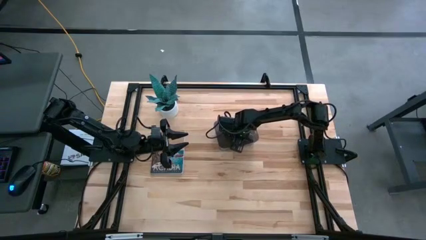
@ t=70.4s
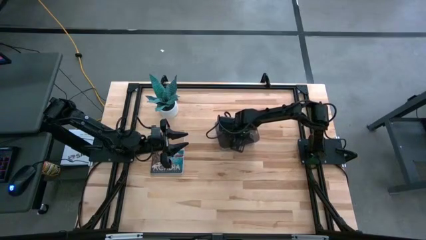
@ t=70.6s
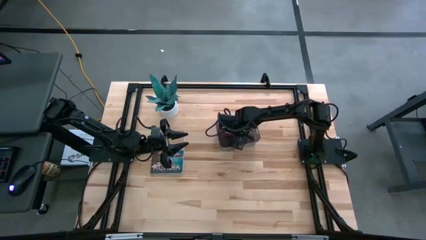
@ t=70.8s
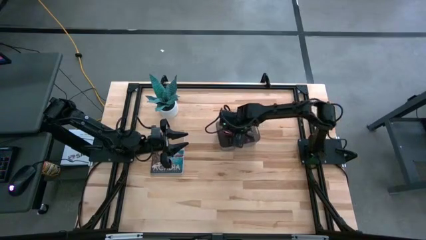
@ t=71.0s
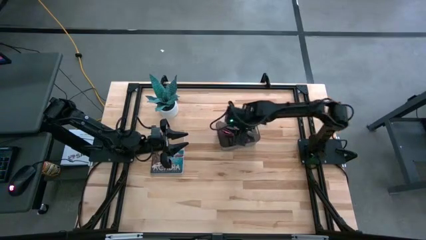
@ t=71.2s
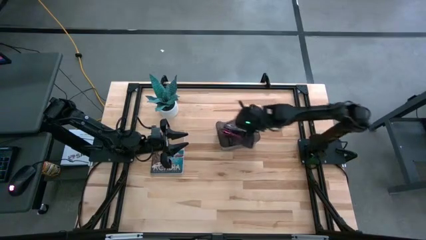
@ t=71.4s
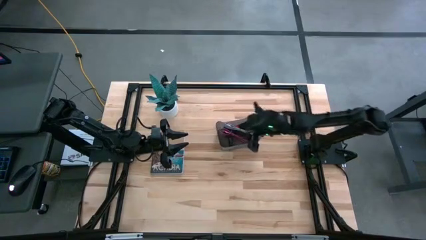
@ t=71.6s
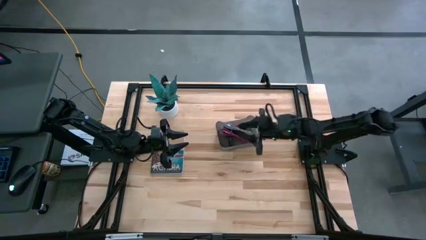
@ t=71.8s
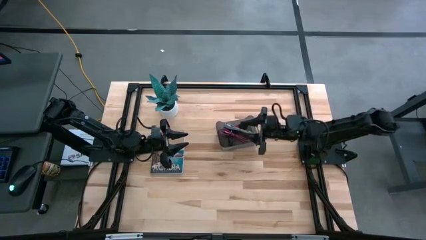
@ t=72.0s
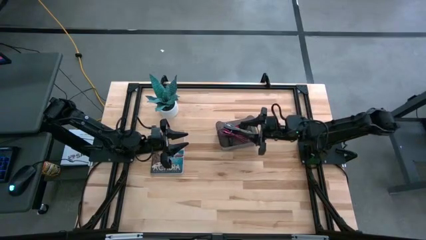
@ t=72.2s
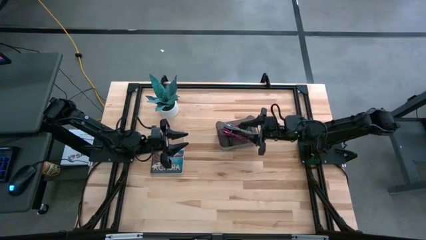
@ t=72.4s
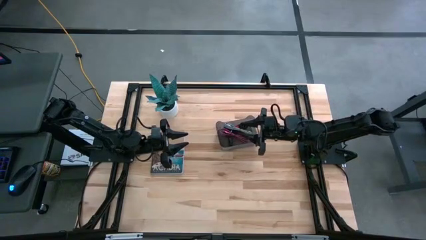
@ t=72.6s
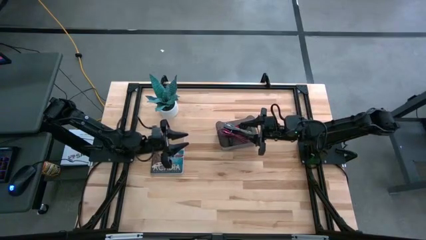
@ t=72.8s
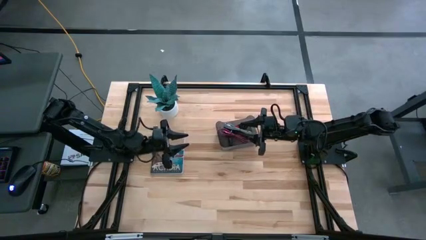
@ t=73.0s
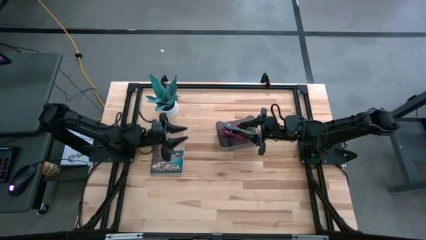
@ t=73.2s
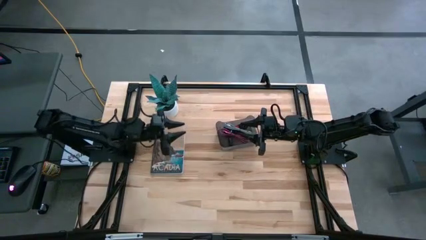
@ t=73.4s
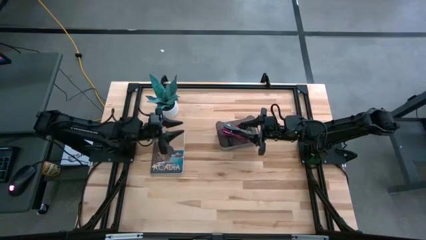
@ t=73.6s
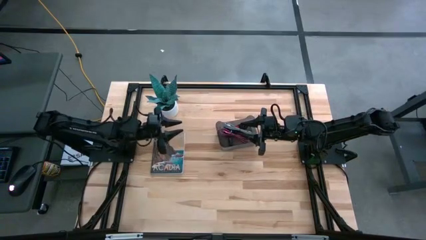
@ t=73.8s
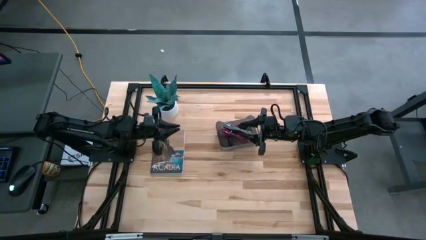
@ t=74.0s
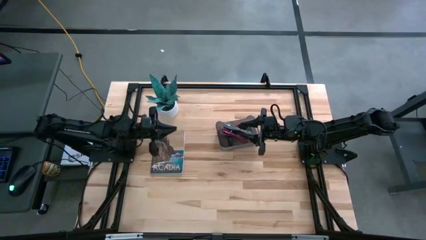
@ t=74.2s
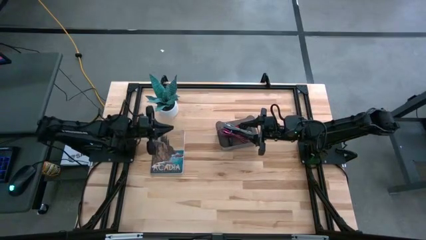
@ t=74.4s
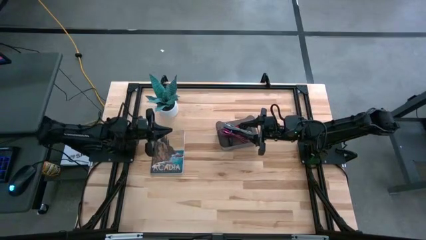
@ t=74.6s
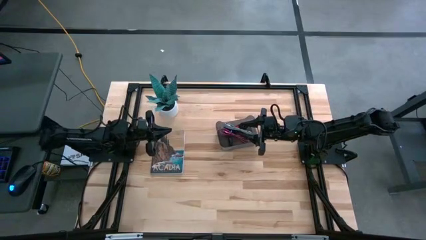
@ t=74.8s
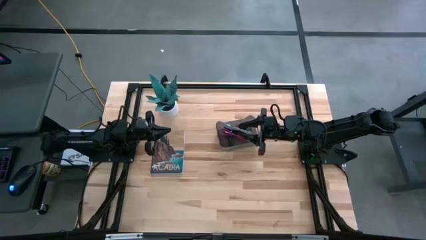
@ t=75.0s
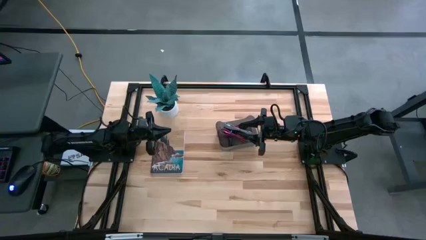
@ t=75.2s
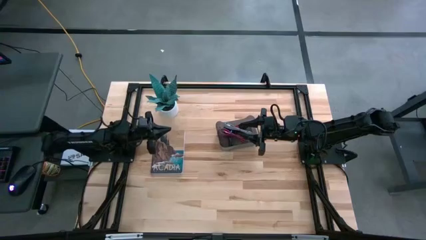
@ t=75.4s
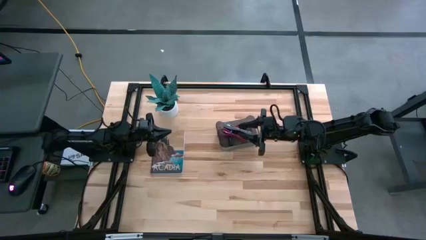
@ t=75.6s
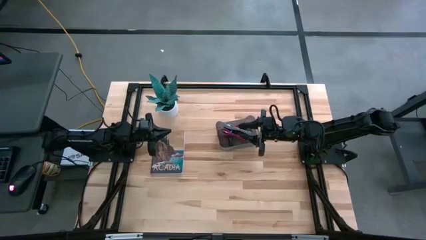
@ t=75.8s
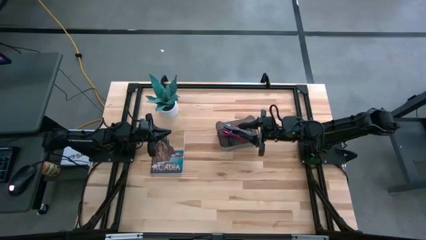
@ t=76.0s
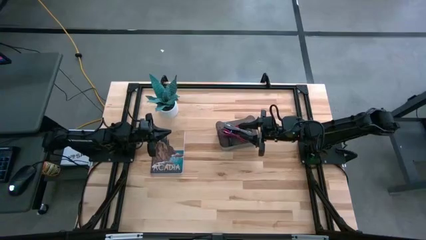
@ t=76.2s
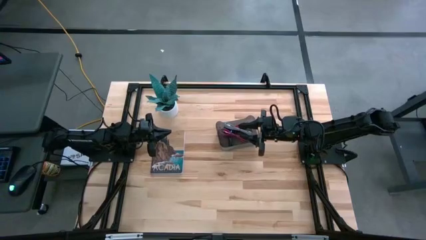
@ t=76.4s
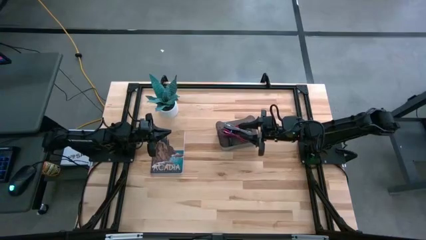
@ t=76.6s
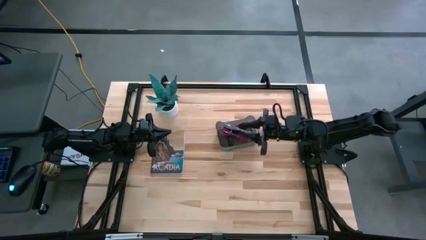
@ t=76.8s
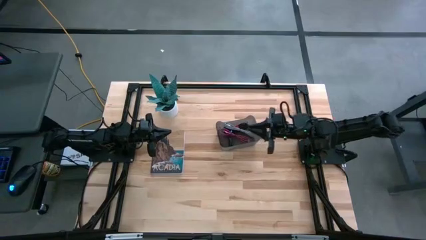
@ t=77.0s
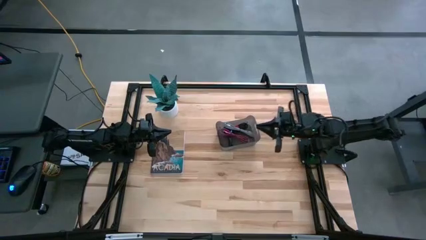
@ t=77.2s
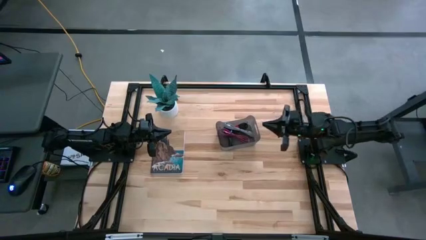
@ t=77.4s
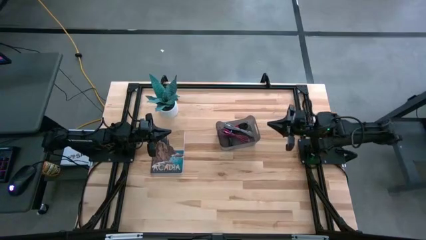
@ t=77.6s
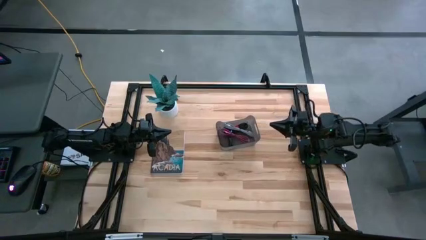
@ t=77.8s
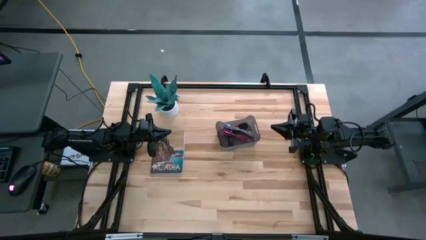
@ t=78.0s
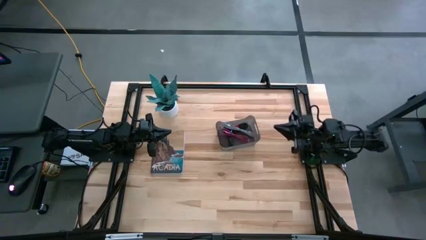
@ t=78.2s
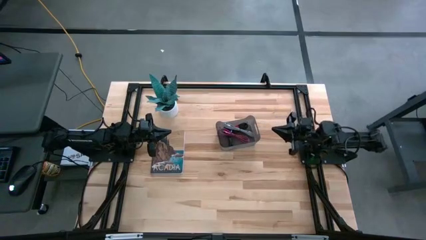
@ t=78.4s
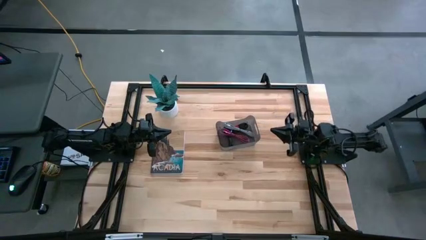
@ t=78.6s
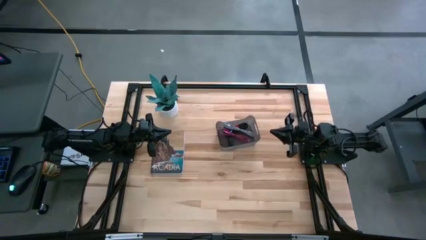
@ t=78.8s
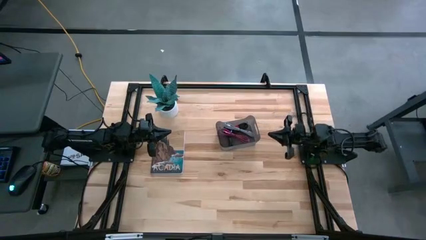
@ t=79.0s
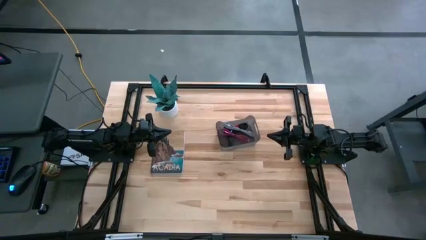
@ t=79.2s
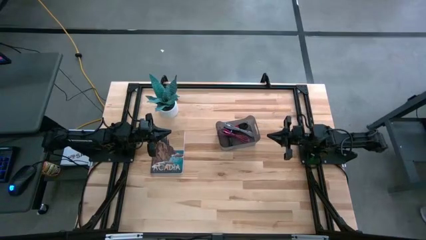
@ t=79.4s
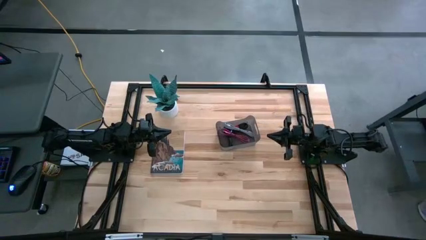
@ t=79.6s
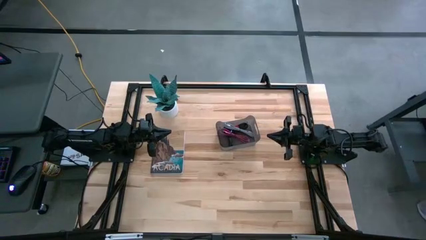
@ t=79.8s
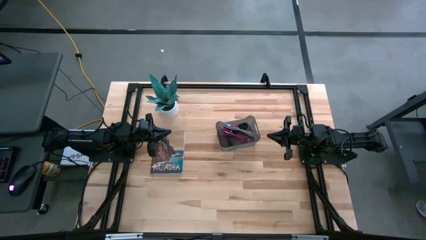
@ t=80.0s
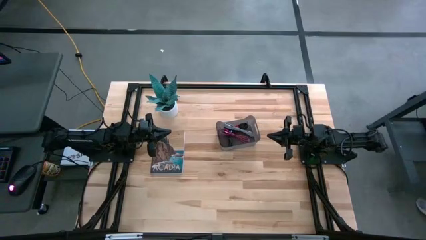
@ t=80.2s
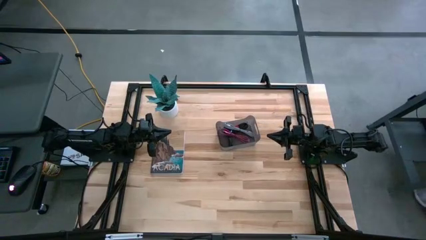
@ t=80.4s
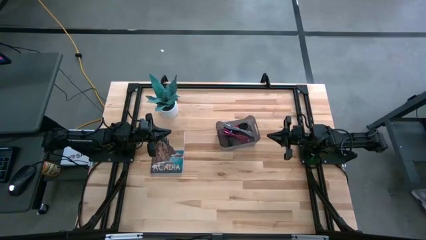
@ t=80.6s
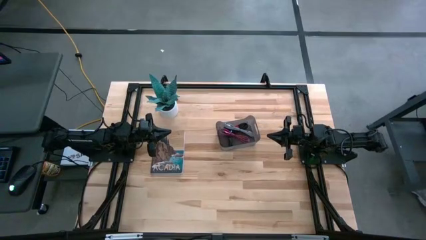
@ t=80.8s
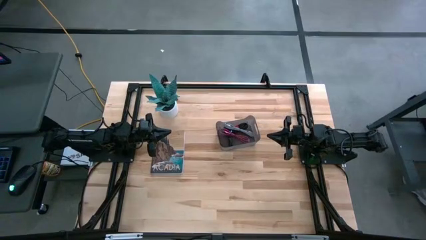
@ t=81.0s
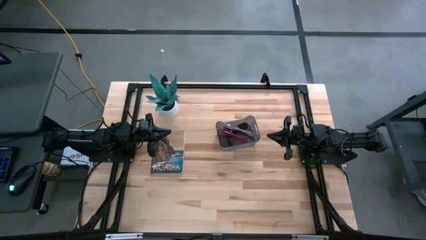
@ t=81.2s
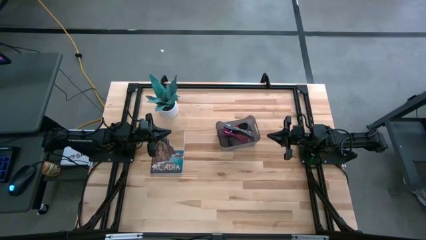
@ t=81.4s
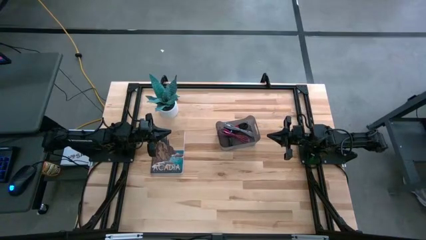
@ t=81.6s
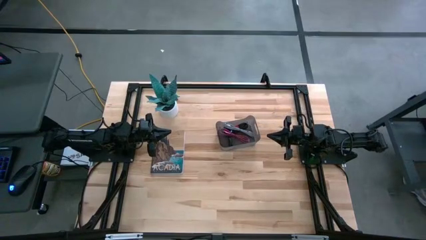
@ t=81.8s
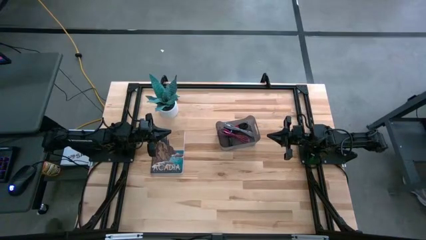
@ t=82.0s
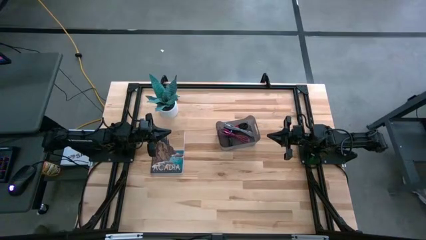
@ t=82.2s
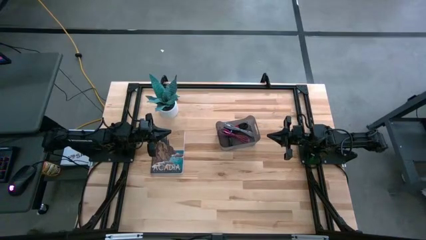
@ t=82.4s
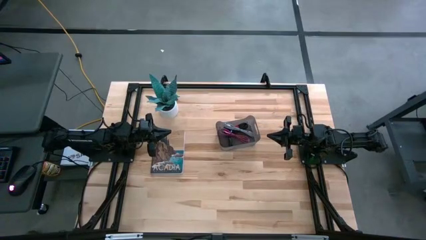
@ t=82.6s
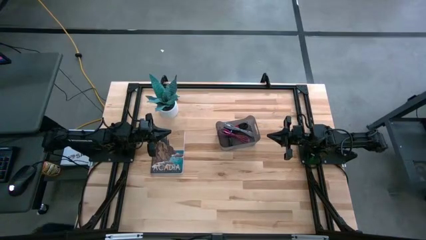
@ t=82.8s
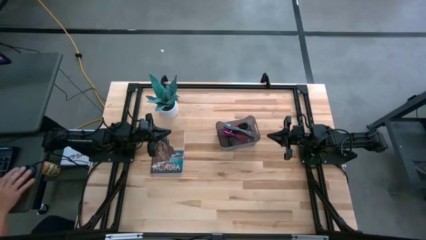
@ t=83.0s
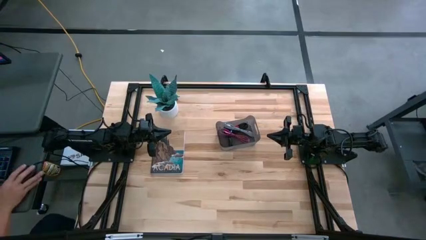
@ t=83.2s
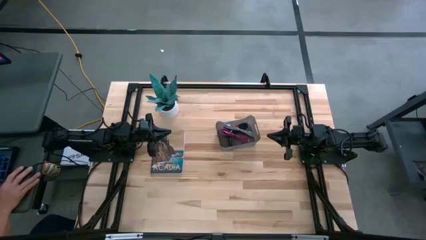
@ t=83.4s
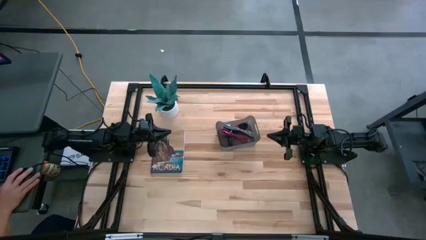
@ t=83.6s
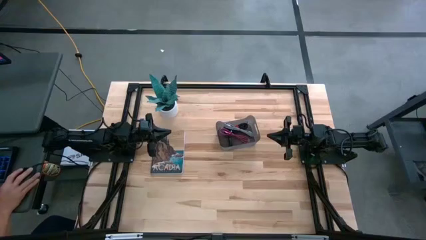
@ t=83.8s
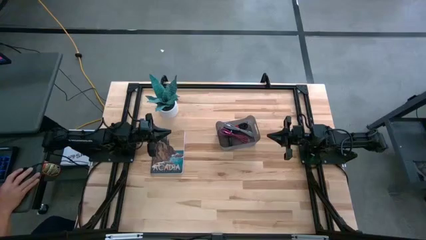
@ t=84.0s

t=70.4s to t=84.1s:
Task: Pick and place USB-C Cables
Return to Home Position
